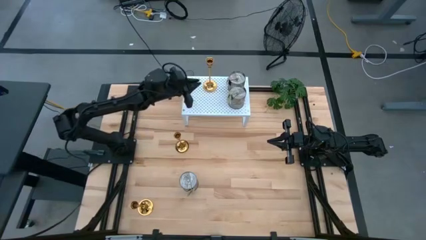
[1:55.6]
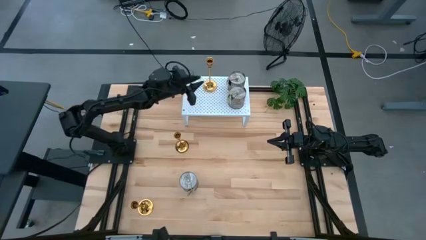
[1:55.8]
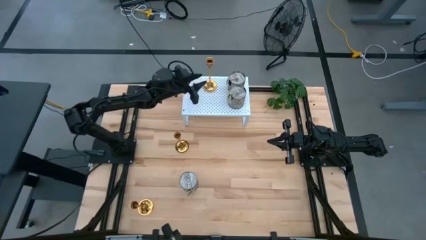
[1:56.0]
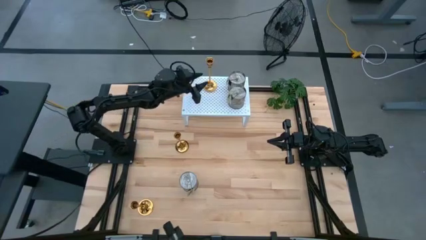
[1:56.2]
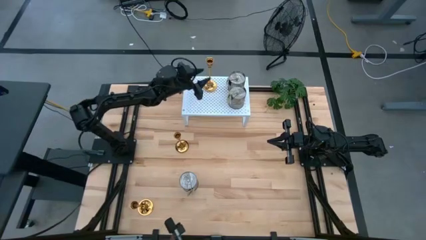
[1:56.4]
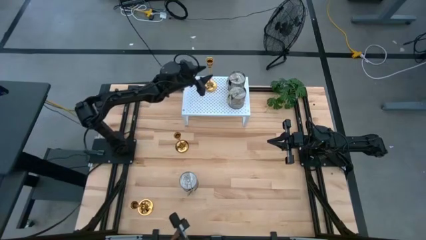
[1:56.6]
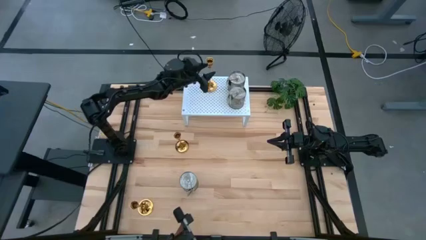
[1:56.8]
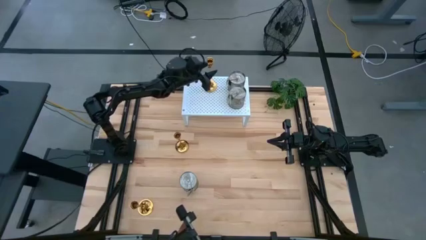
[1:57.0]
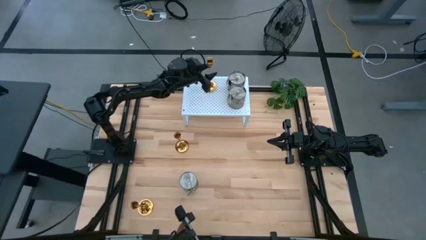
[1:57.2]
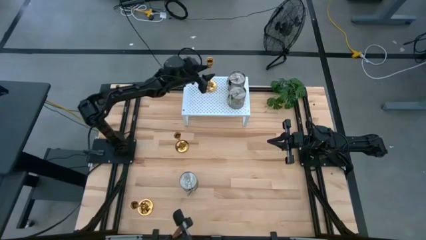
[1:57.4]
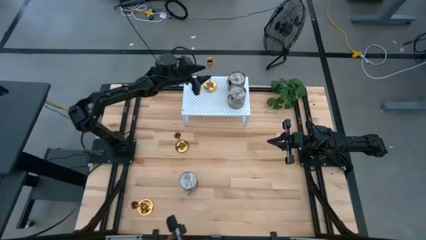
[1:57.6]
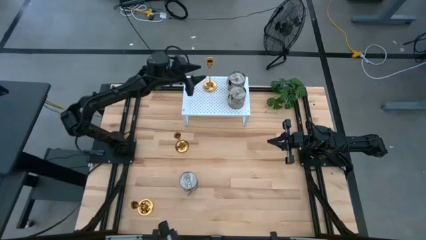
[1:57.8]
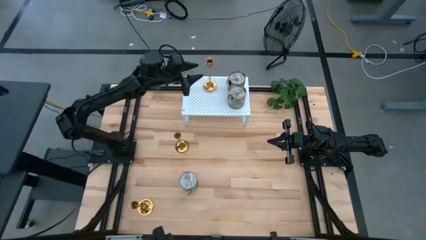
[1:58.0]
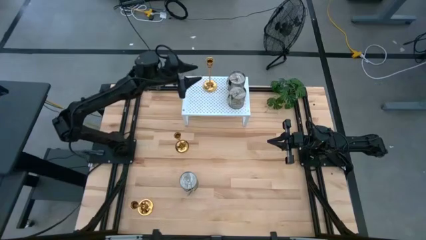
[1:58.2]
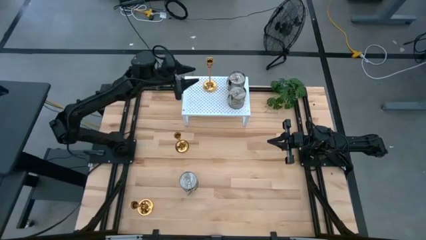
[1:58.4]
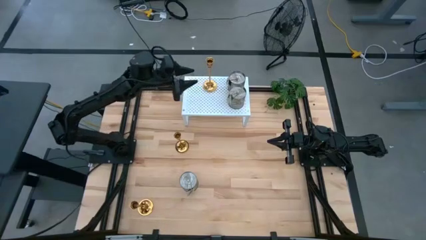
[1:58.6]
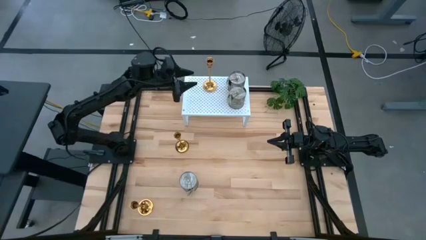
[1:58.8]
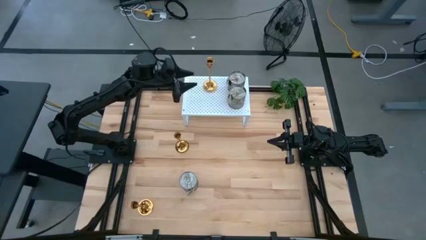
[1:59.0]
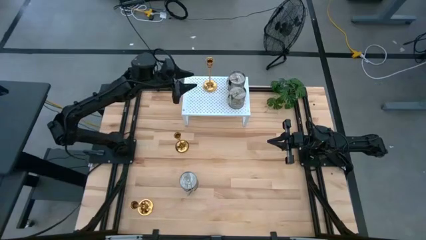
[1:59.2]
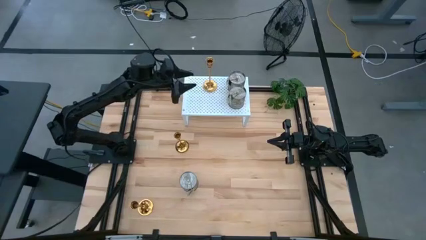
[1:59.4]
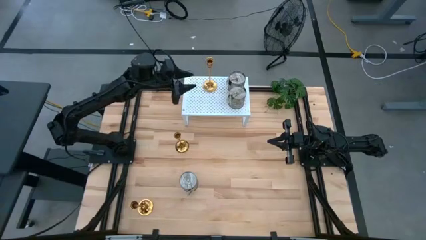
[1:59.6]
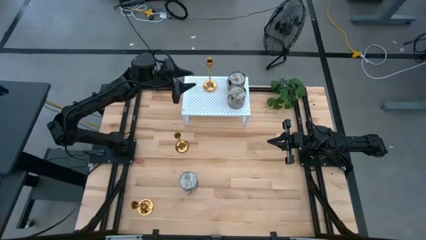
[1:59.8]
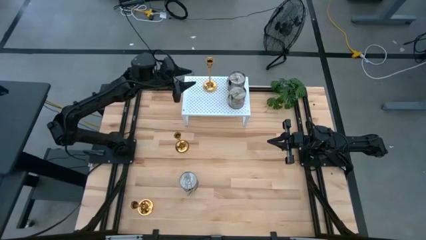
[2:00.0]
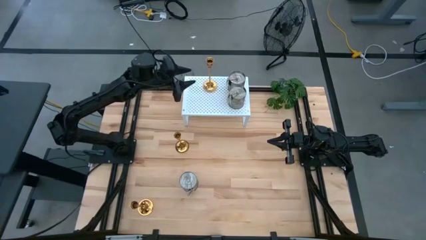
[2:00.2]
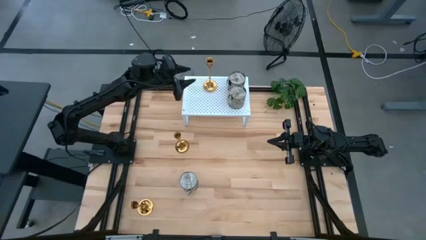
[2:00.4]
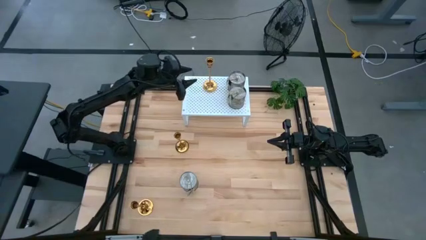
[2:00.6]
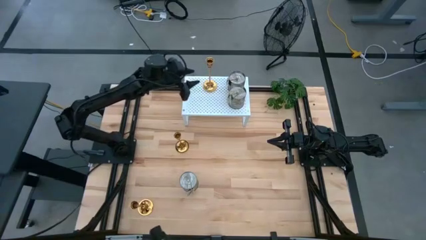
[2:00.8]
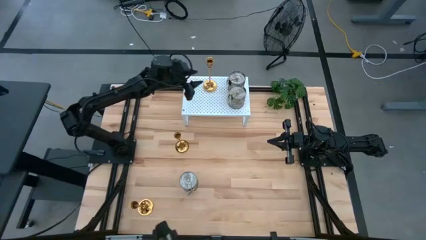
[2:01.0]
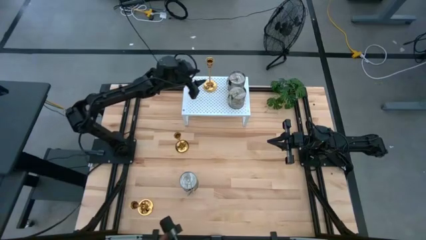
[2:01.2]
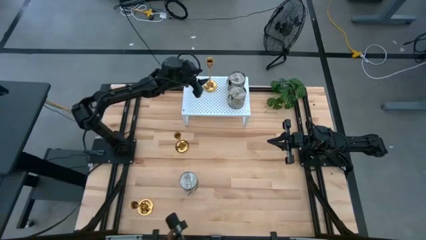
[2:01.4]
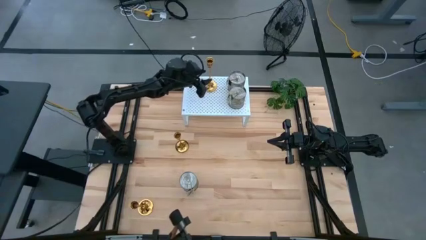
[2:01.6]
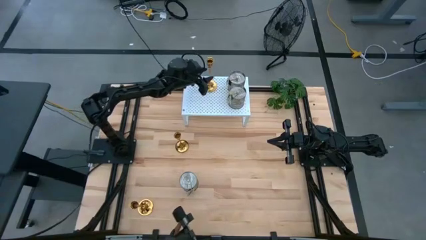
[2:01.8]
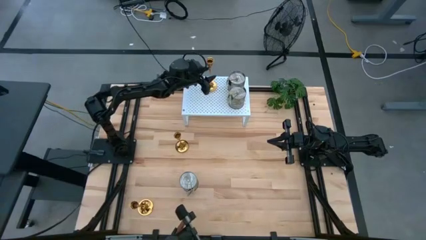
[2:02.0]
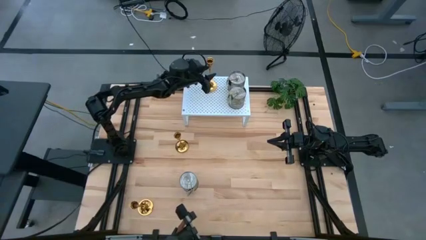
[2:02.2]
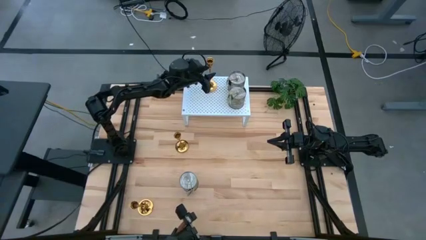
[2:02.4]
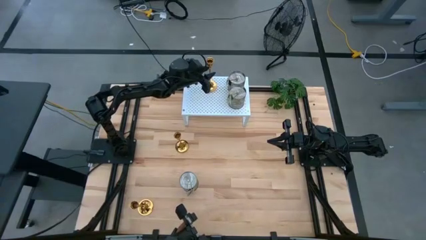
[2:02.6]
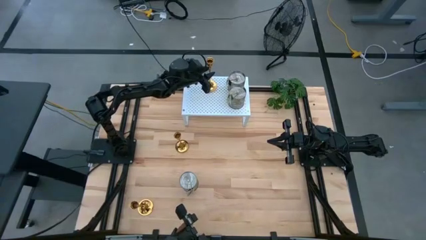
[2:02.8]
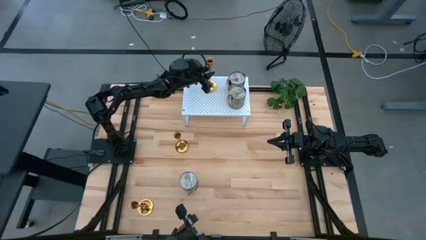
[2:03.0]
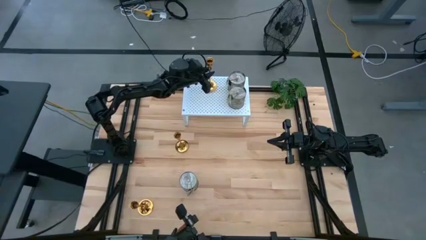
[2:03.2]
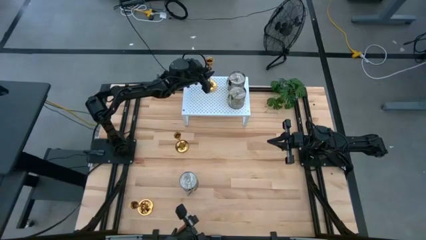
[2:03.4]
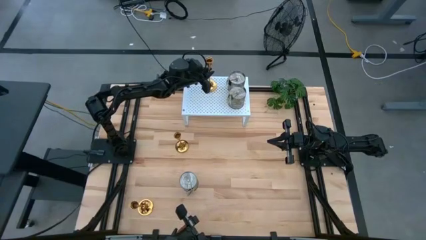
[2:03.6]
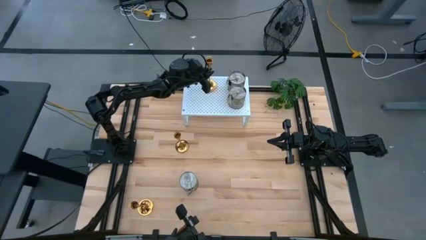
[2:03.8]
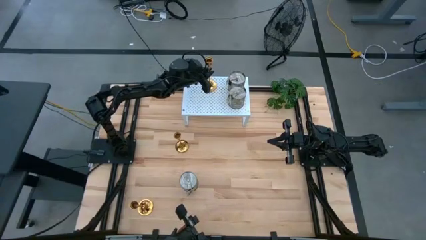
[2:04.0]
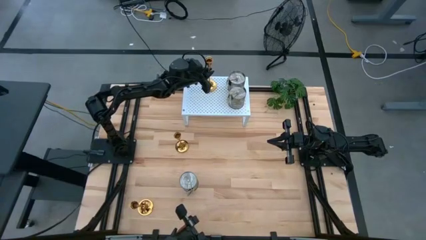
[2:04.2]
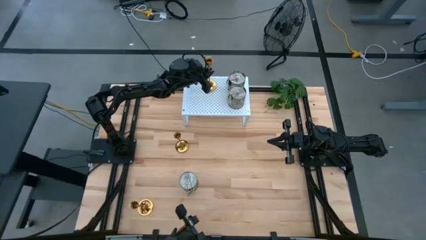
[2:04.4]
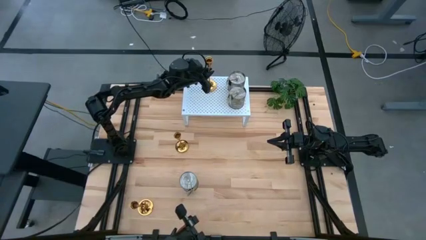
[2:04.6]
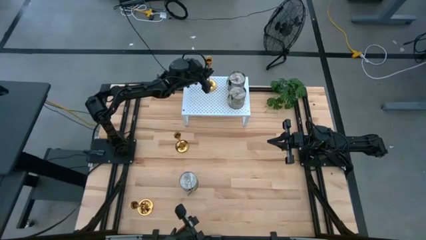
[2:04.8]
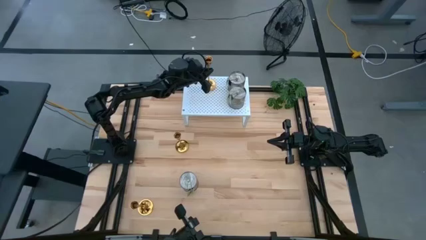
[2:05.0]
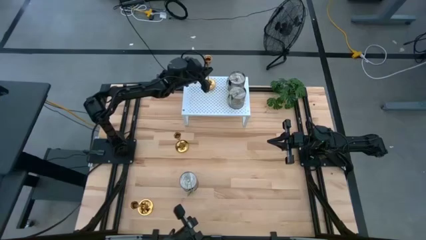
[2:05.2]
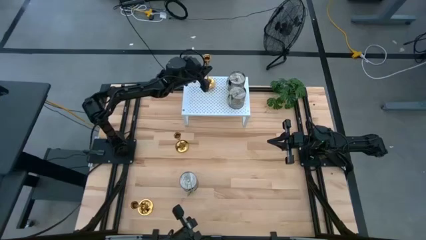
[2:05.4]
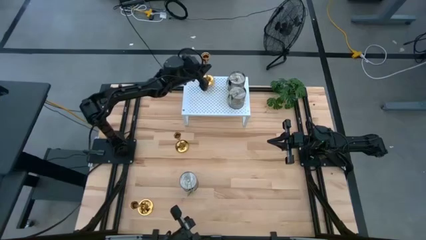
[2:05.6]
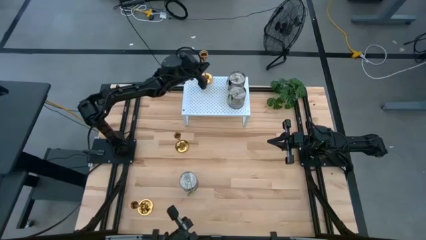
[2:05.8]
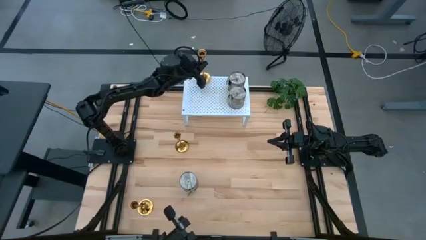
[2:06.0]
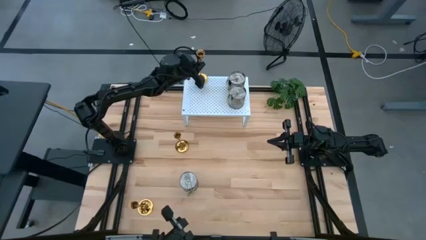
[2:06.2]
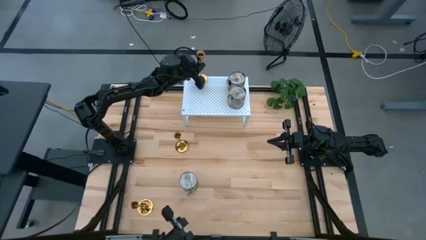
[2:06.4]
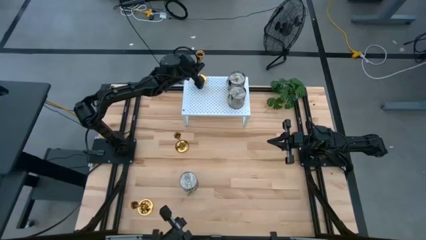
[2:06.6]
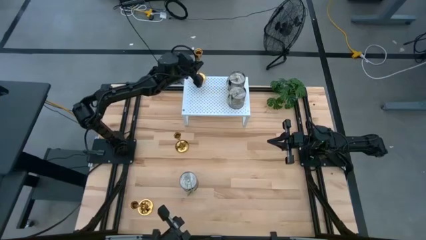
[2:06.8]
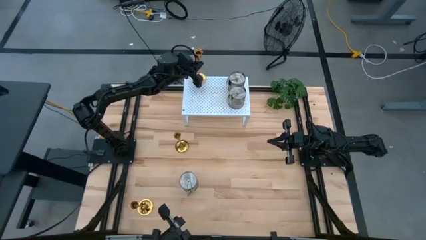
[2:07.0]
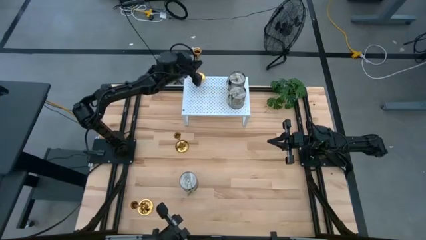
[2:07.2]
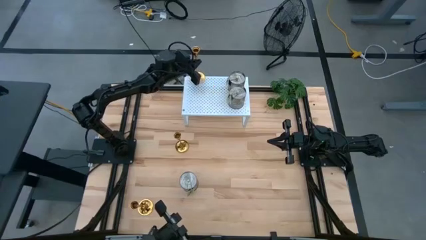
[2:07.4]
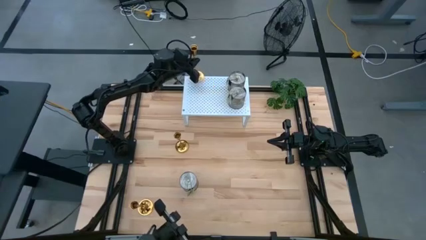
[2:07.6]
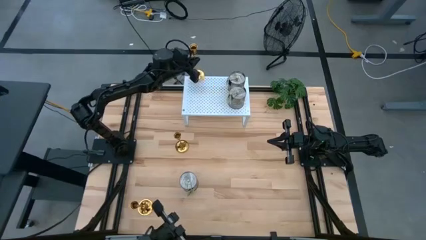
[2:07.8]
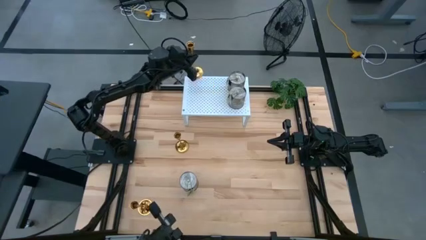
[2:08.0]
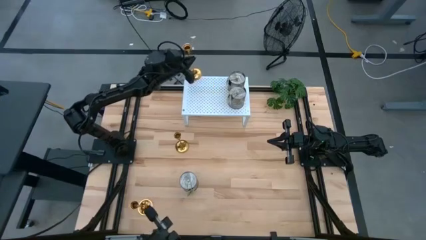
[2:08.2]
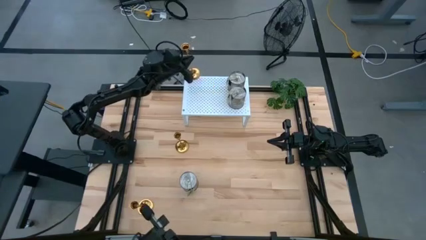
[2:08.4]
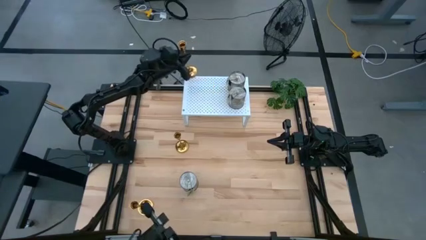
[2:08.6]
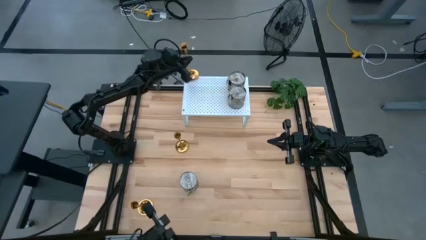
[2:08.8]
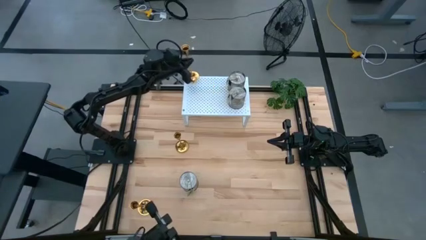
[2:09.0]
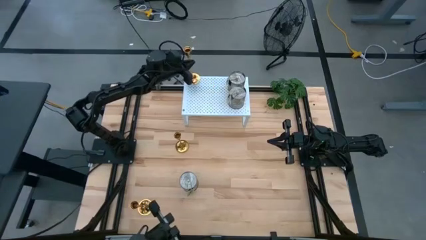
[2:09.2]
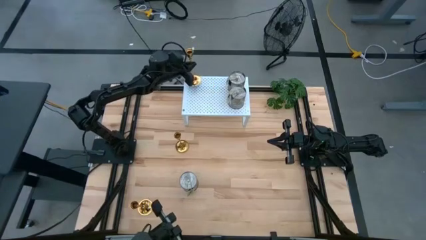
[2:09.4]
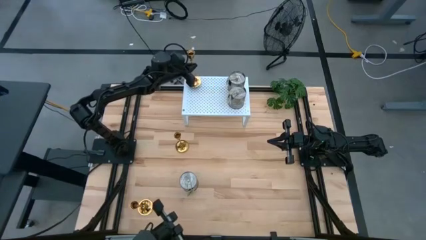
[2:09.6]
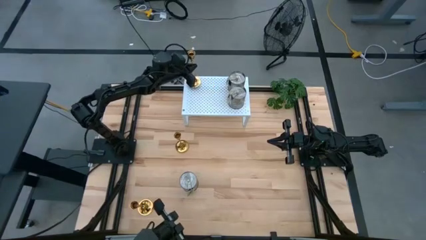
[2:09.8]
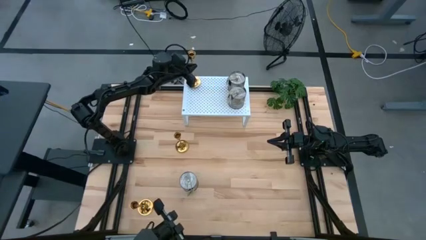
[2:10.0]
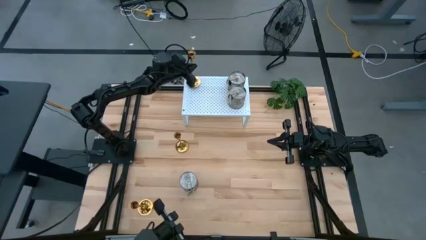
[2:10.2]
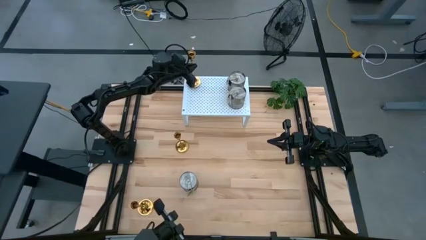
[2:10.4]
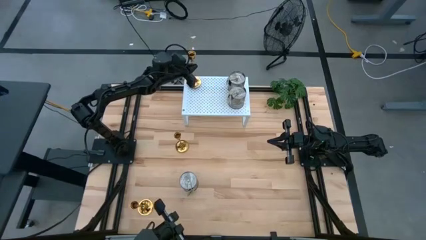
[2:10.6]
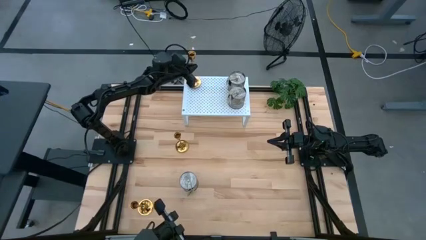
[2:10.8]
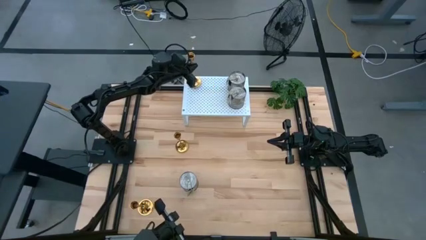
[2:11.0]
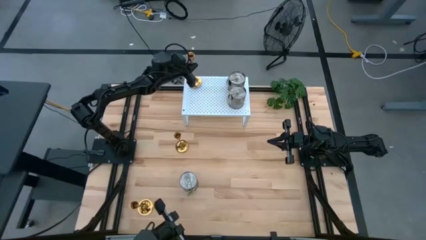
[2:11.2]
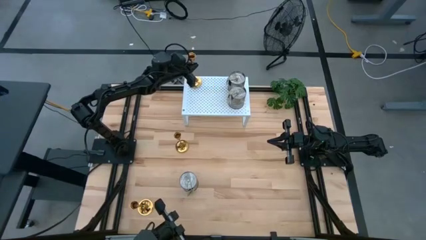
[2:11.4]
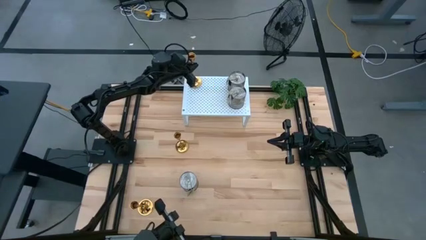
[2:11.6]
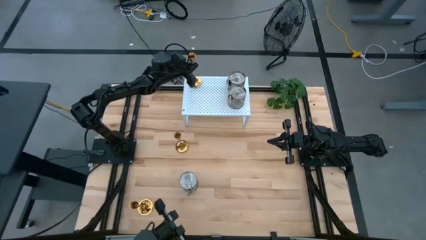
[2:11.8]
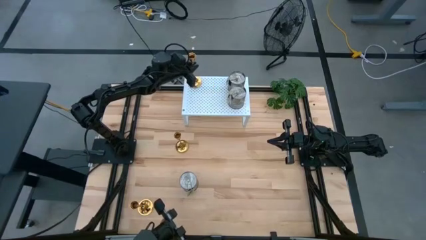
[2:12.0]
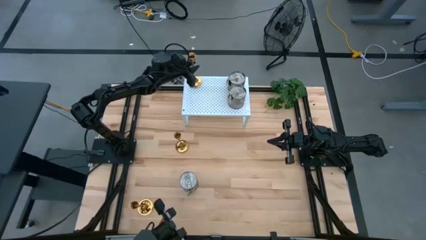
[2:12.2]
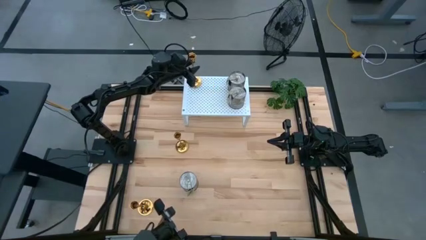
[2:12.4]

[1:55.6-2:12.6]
Task: Pick & Place candle stick holders
Adjust the candle holder on the shelf
